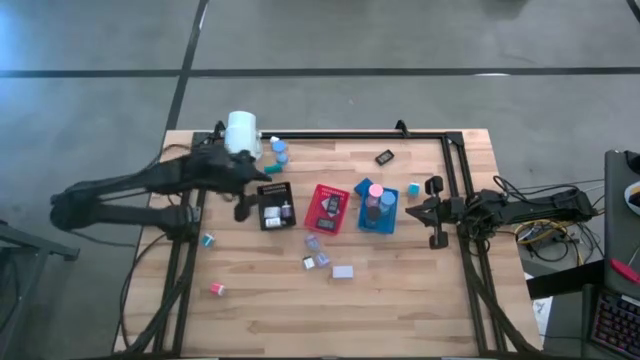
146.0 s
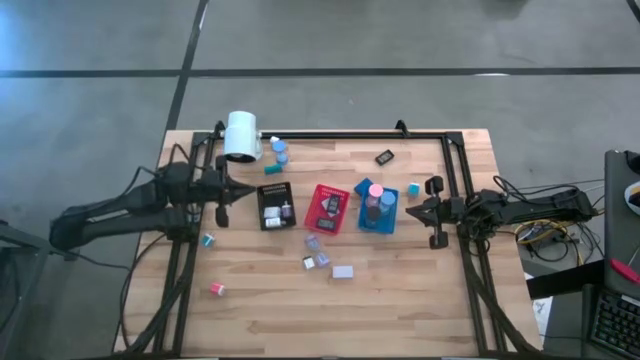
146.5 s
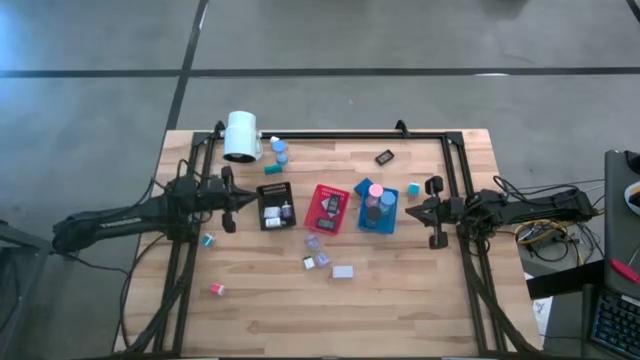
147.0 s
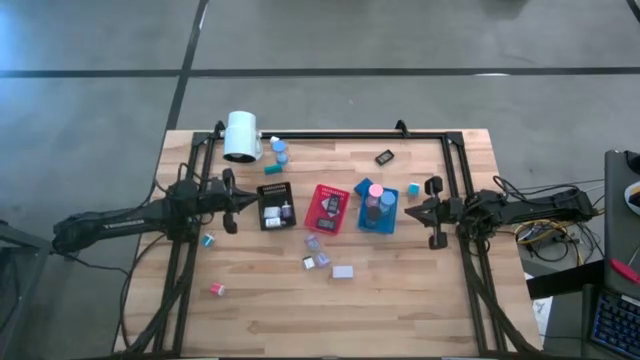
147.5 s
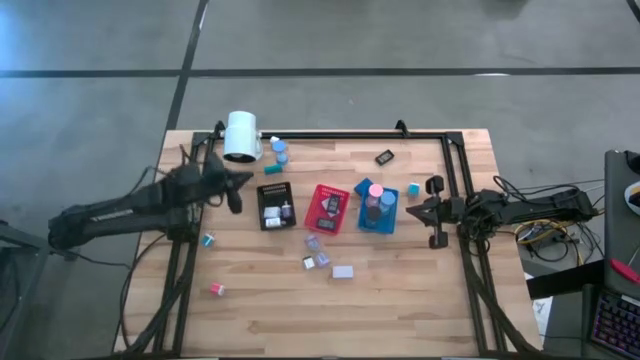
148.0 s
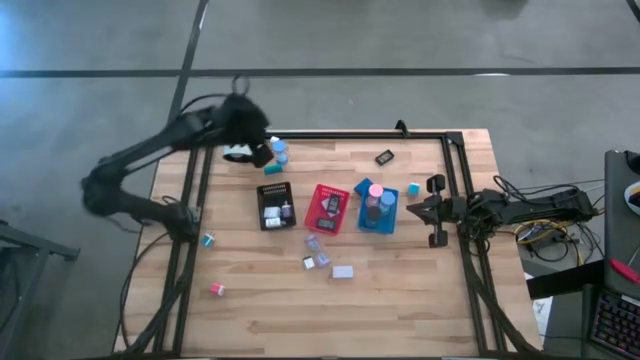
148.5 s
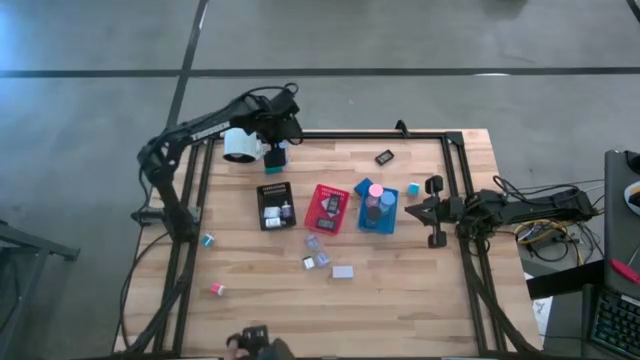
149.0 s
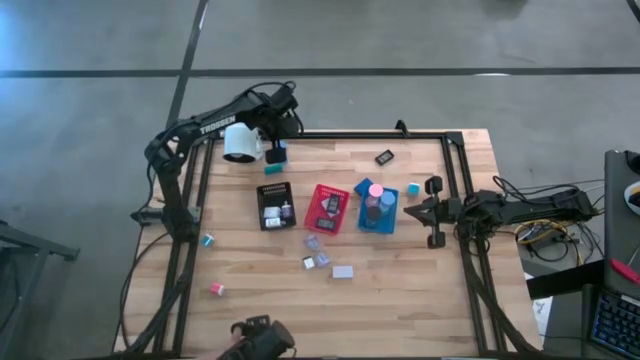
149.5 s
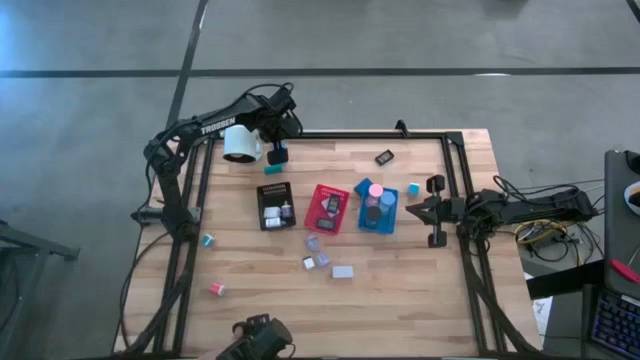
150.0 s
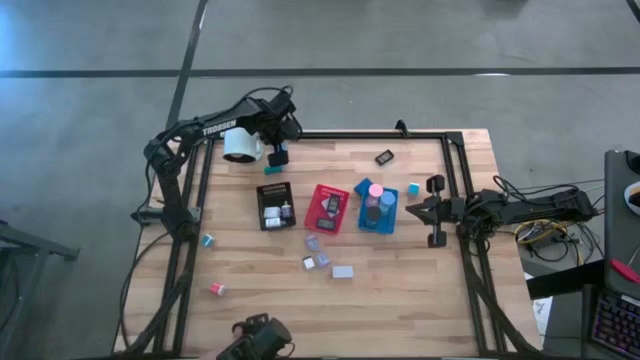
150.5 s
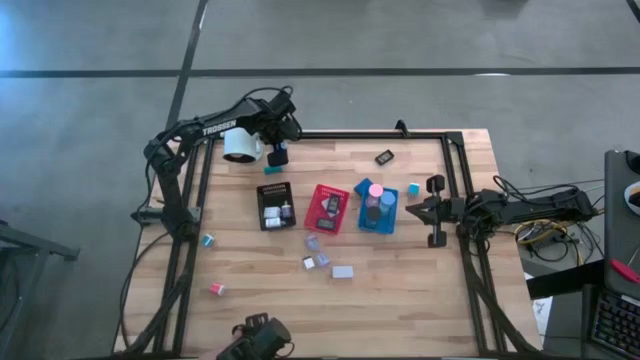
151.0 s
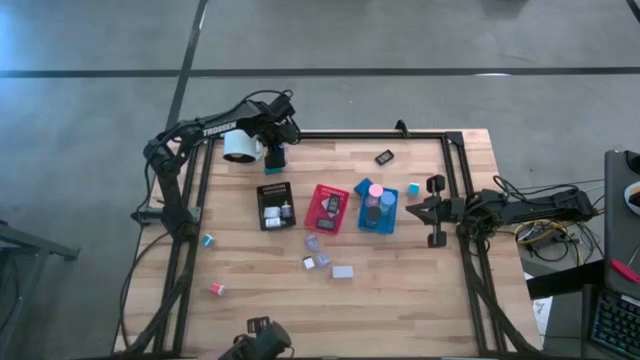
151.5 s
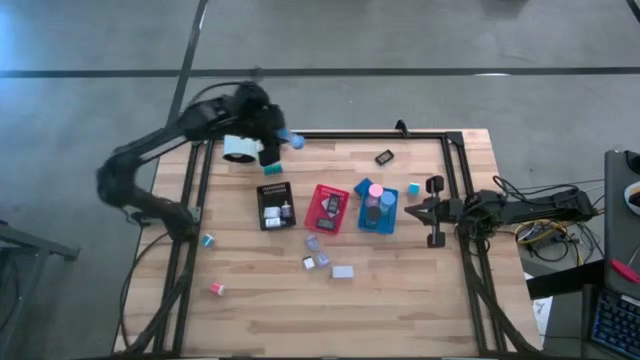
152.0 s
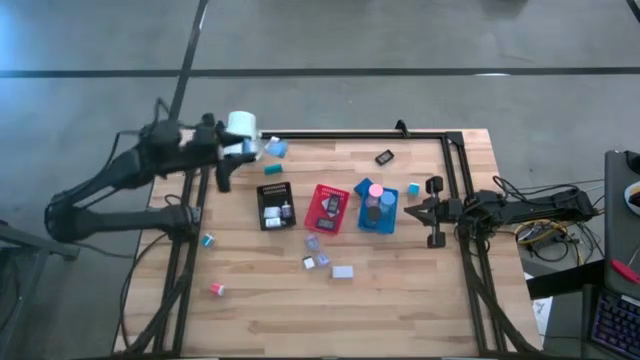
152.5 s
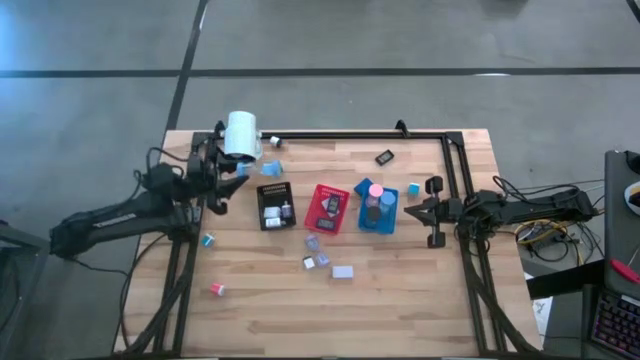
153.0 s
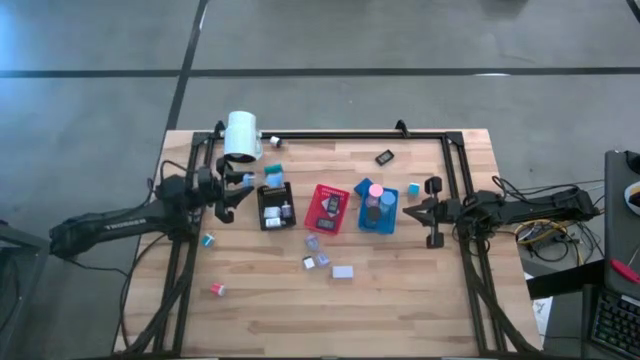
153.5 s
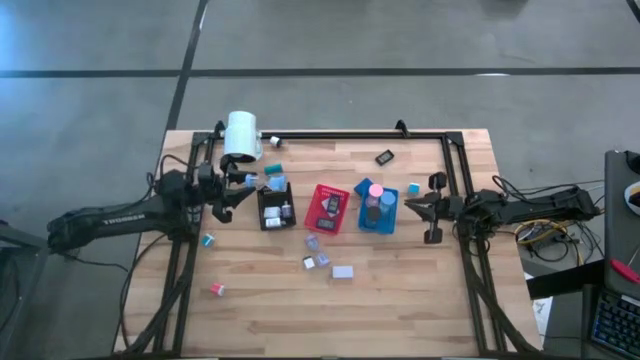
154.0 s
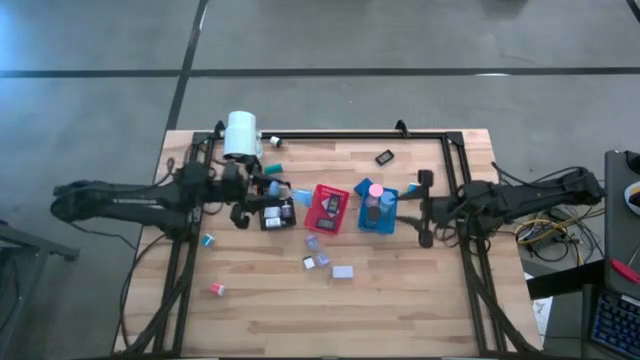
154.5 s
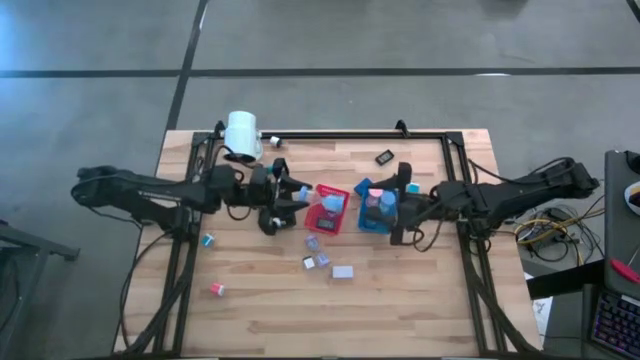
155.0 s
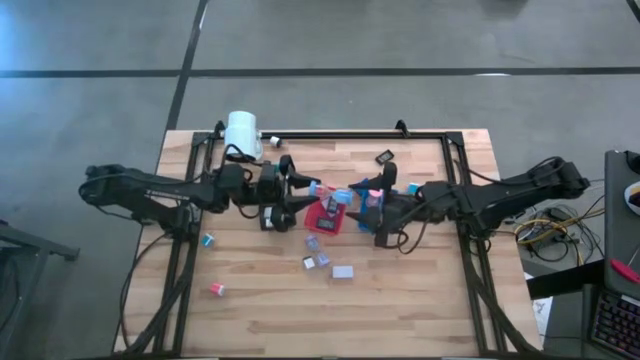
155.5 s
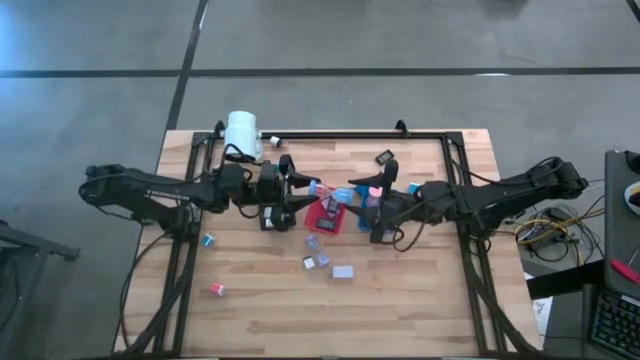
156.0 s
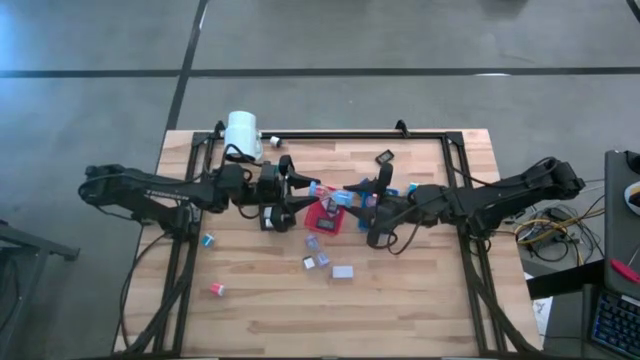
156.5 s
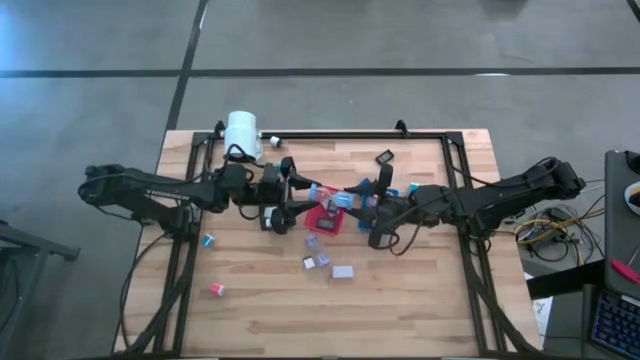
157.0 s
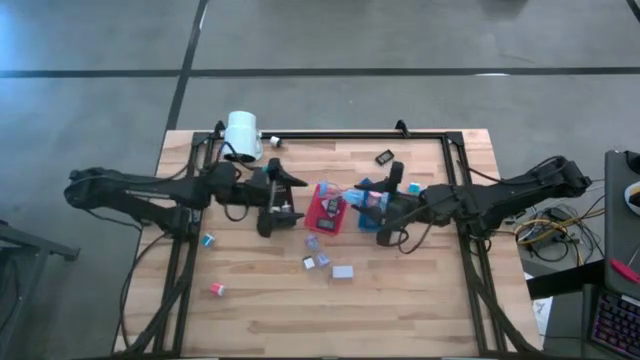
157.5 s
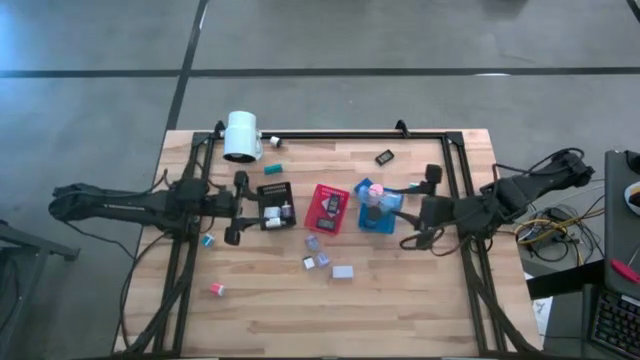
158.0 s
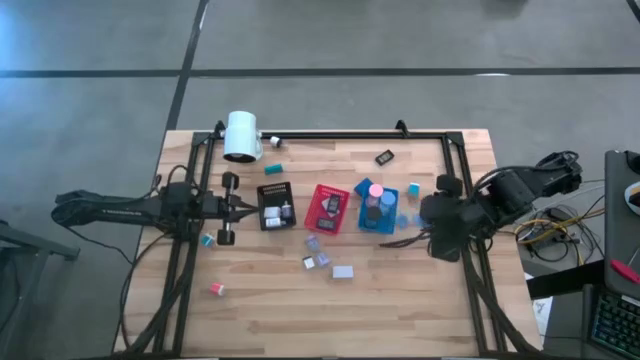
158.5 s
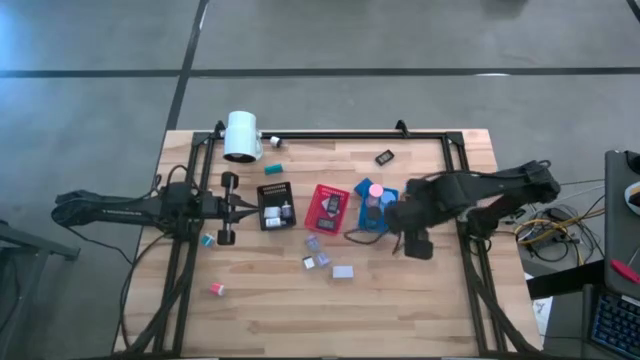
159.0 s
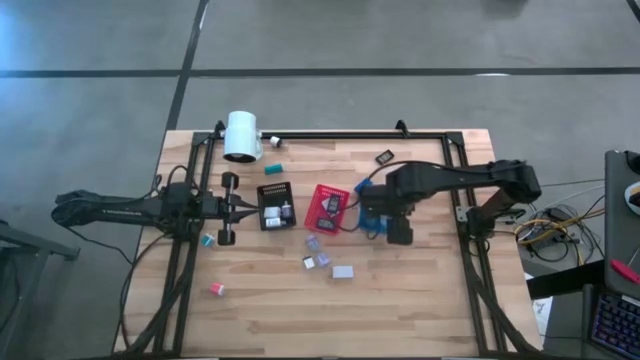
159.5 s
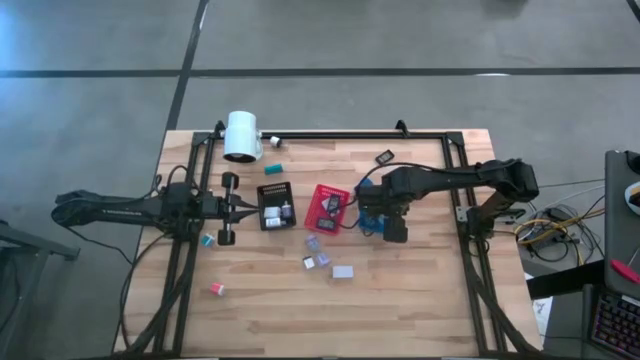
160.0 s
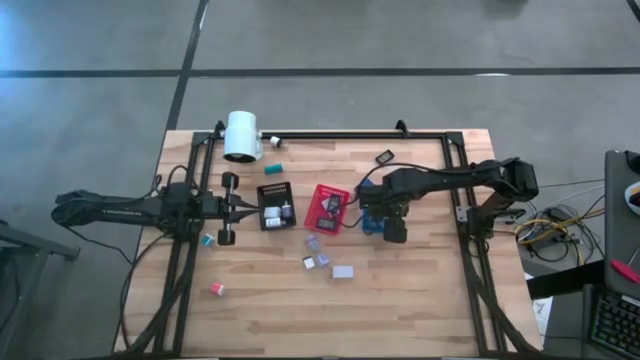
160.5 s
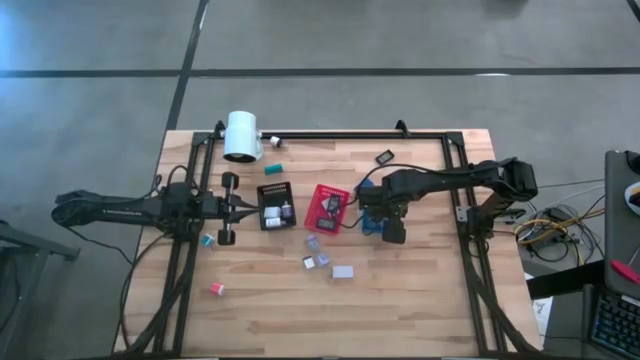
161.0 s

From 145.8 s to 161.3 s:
Task: Pick & Place Office items
Put the blue hourglass into the blue bin

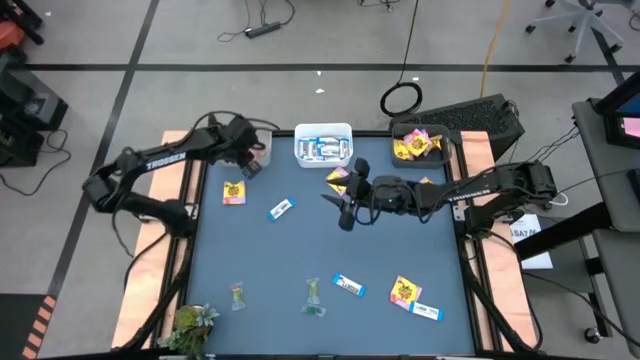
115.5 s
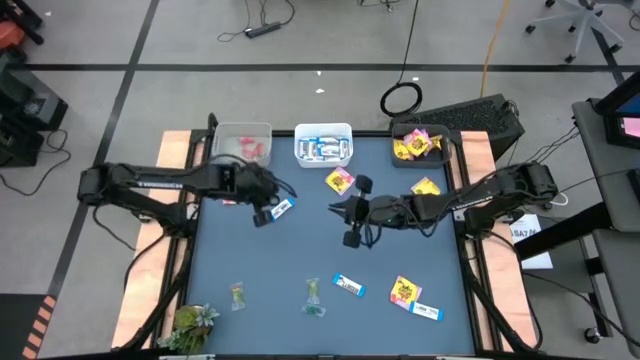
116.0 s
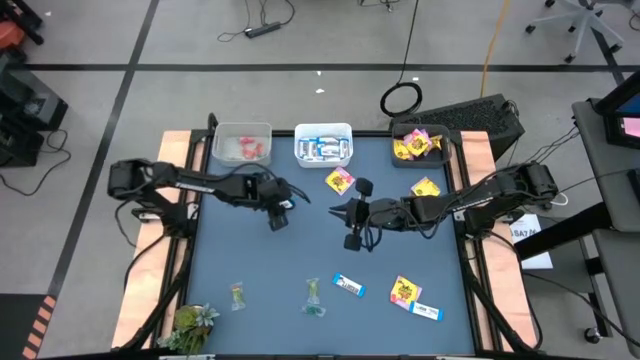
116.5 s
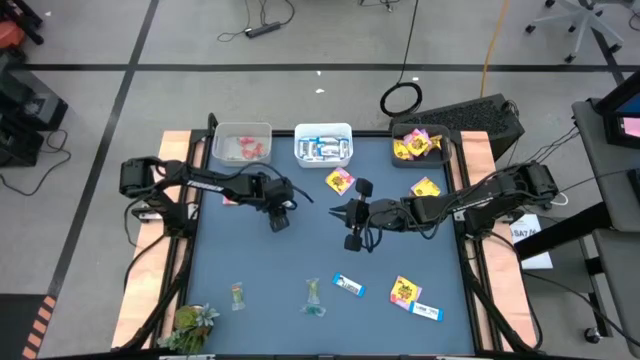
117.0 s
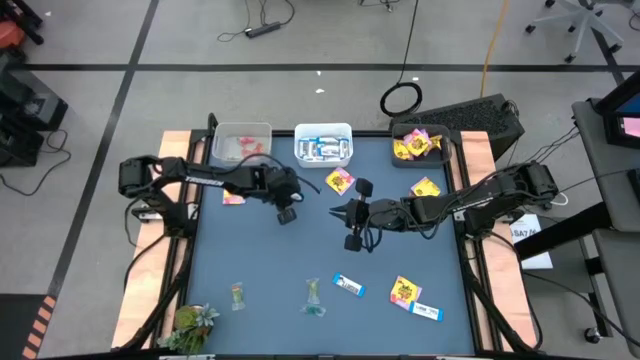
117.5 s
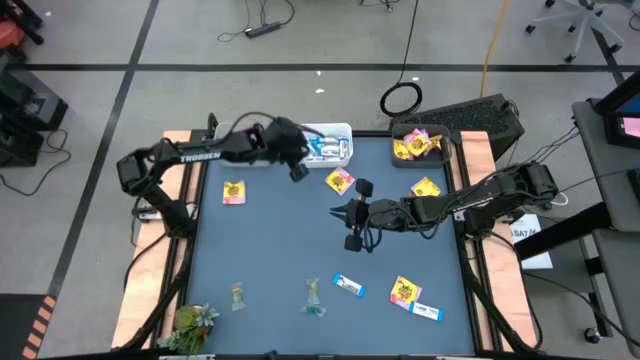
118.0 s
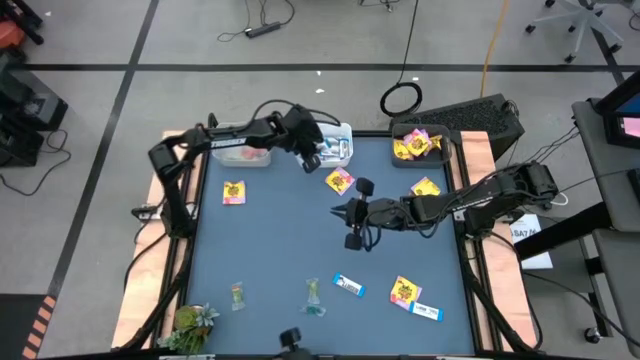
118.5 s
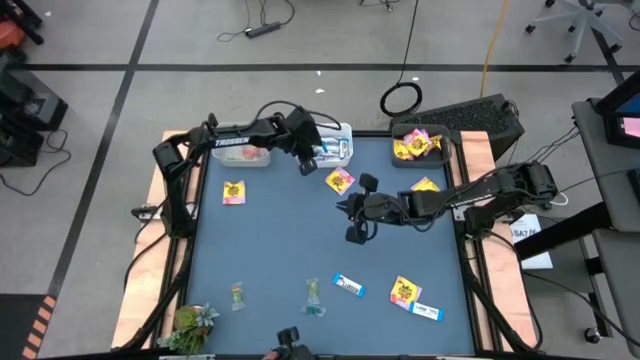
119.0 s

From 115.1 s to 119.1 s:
Task: Sort candy
Put the white chocolate into the white bin

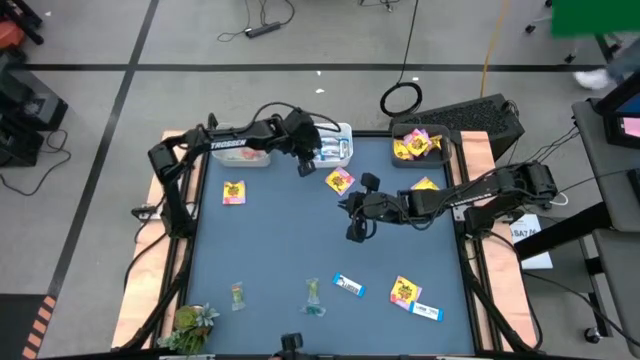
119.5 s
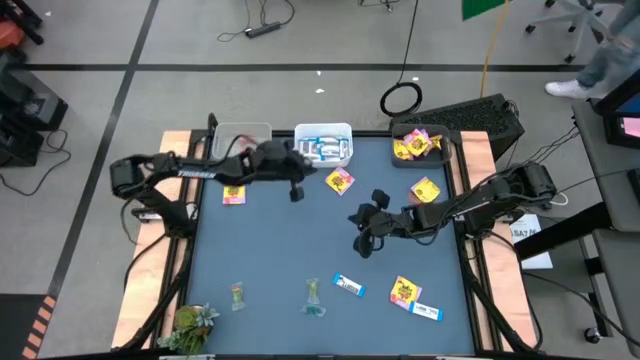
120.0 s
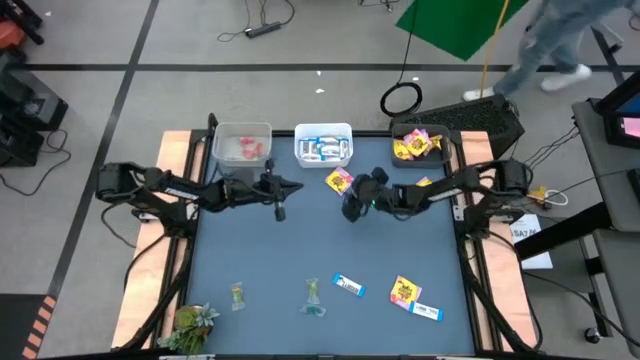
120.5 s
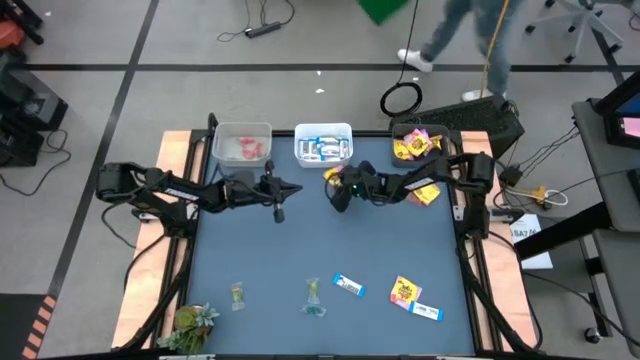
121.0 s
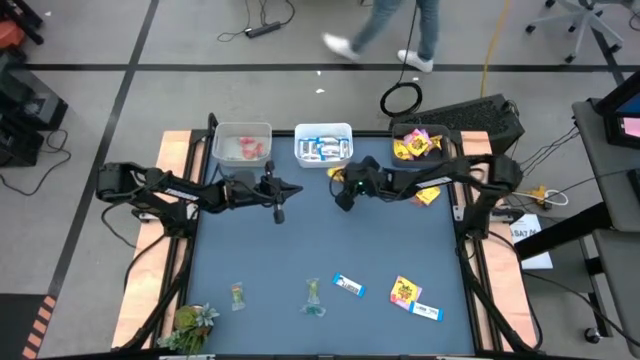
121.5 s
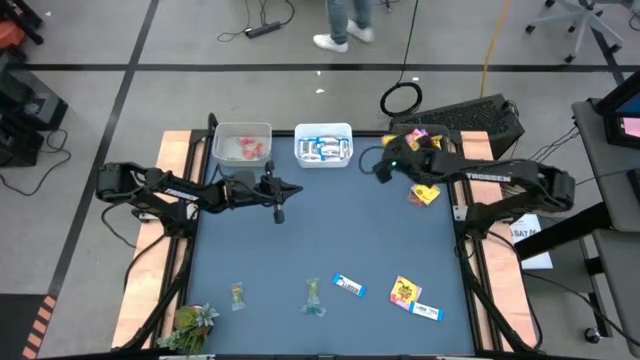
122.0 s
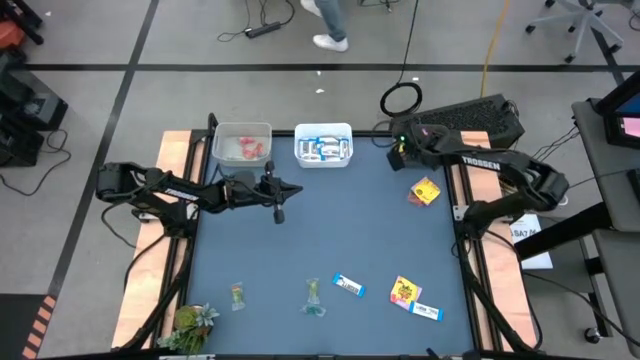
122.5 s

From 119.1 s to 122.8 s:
Put the yellow candy into the black bin
